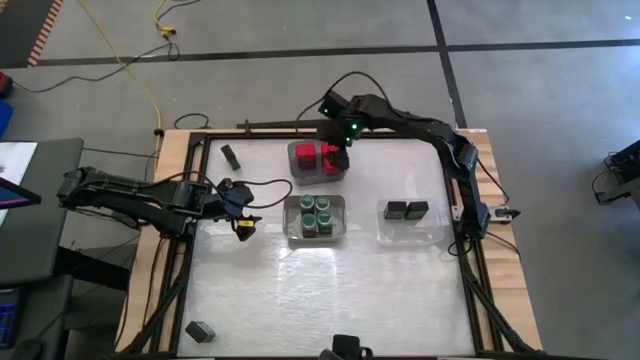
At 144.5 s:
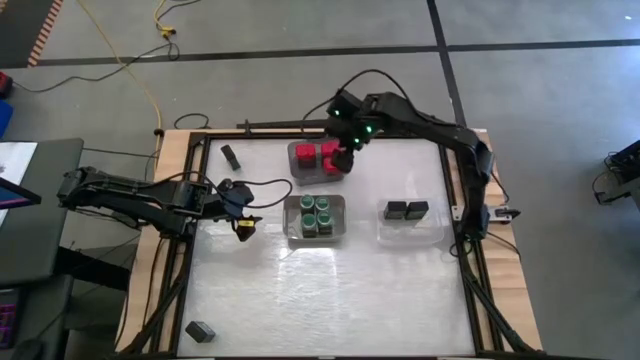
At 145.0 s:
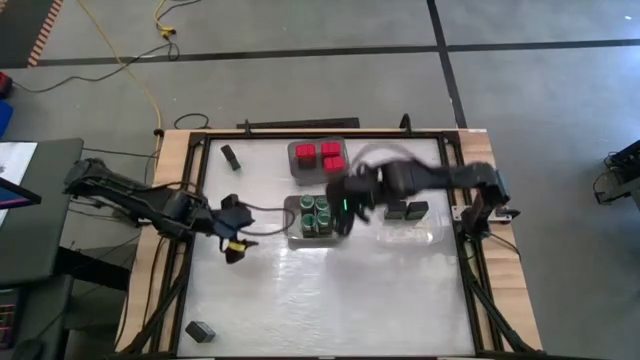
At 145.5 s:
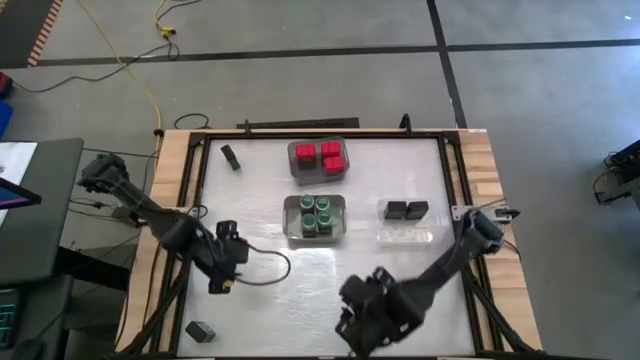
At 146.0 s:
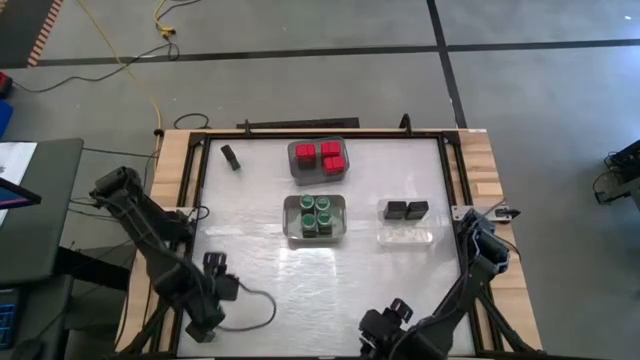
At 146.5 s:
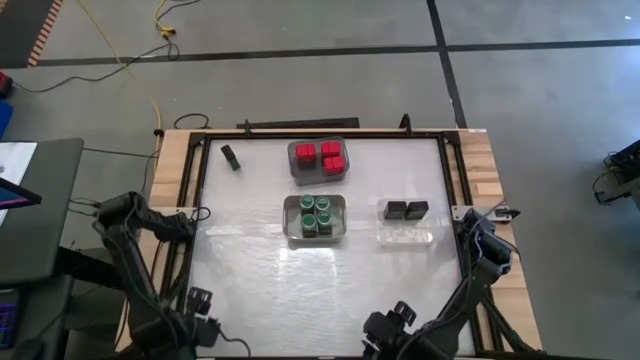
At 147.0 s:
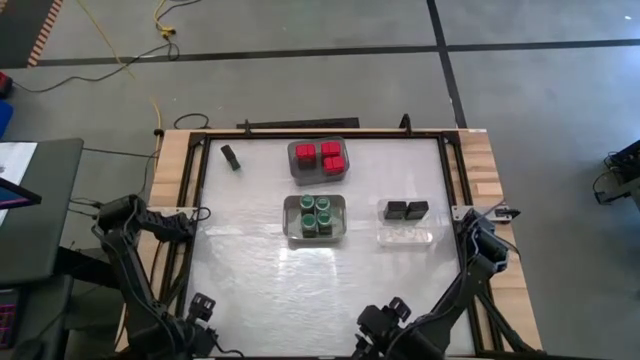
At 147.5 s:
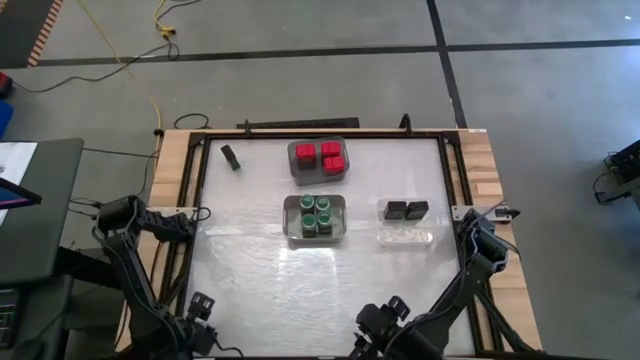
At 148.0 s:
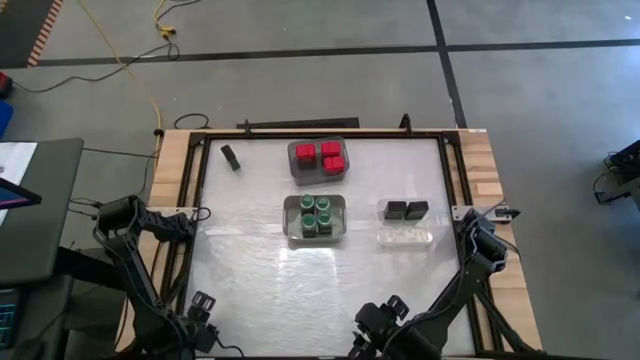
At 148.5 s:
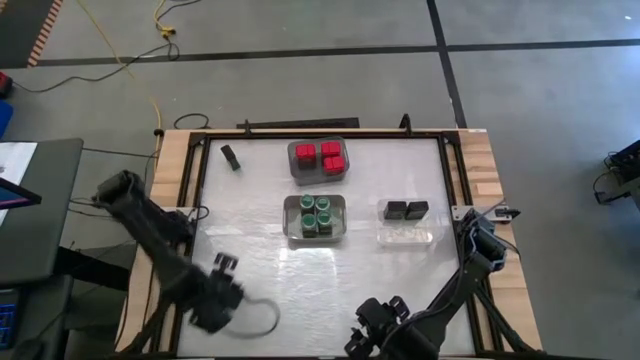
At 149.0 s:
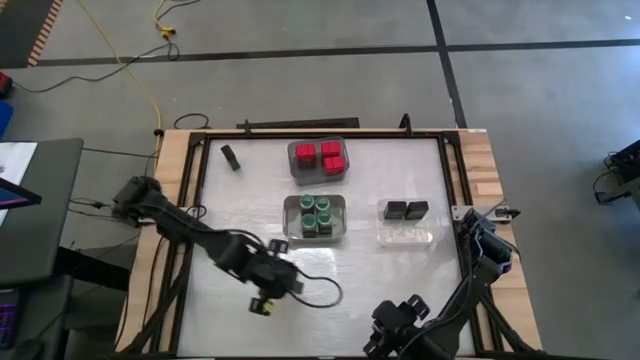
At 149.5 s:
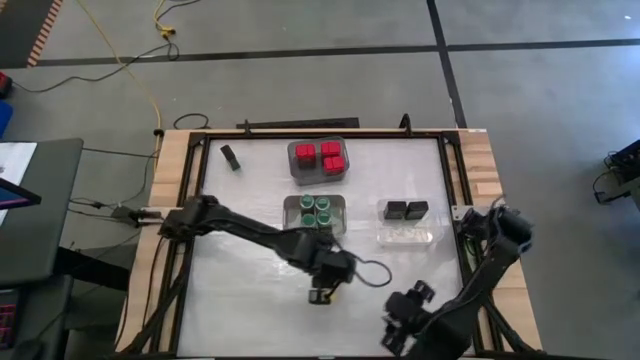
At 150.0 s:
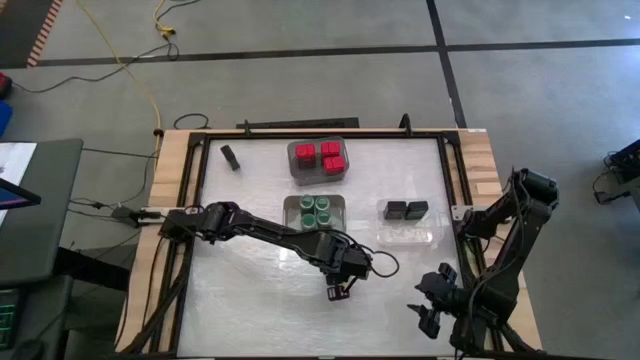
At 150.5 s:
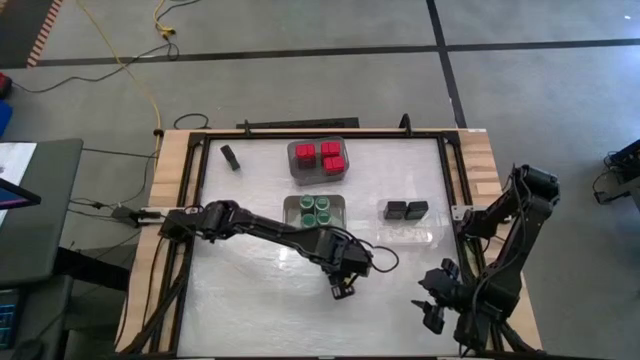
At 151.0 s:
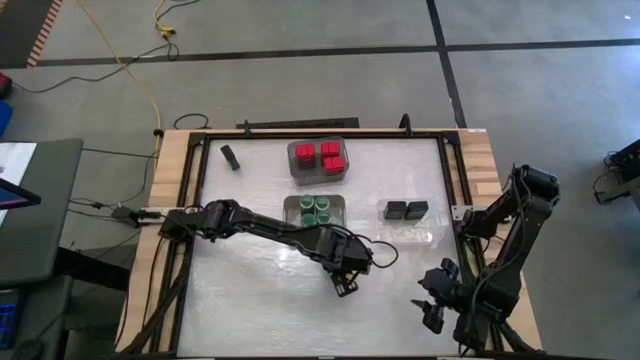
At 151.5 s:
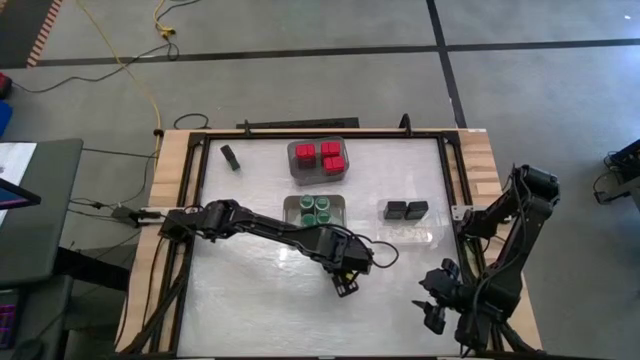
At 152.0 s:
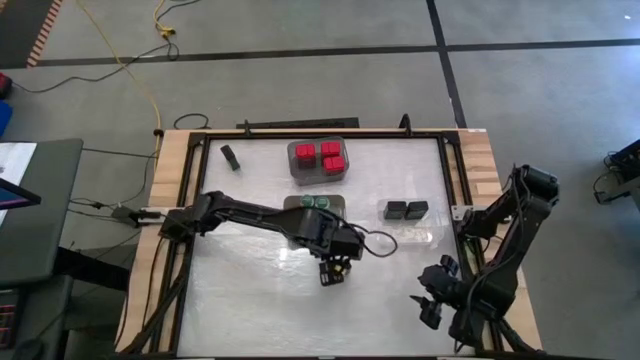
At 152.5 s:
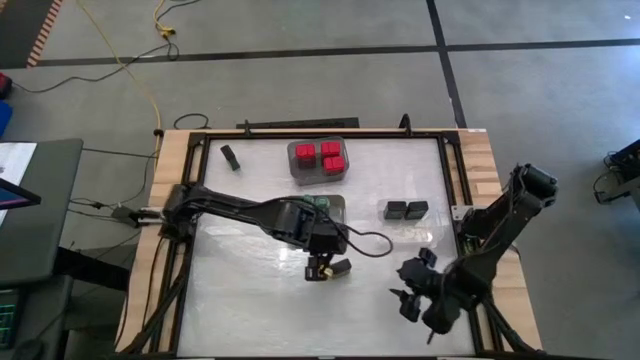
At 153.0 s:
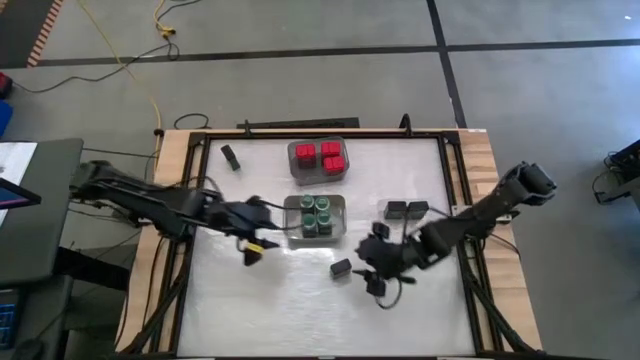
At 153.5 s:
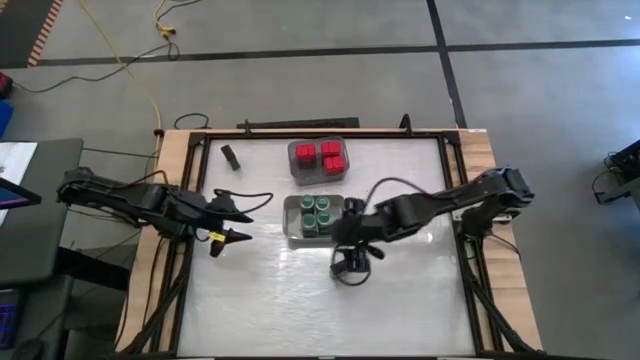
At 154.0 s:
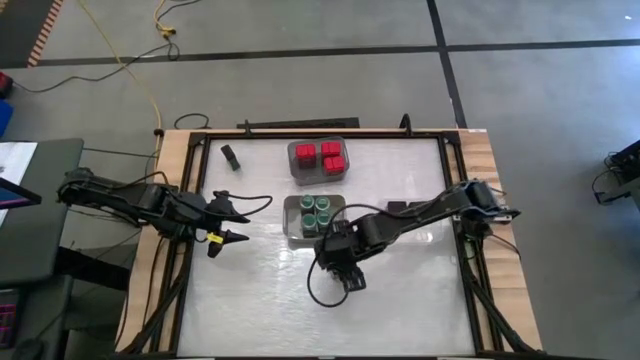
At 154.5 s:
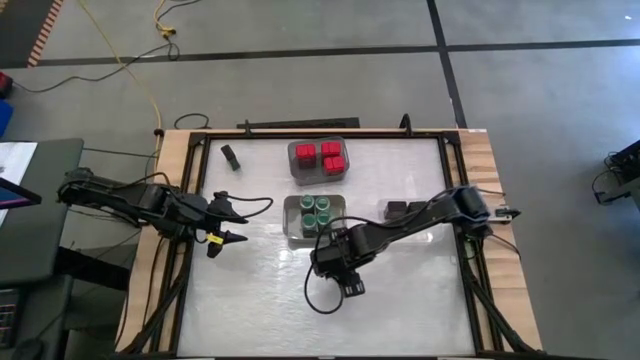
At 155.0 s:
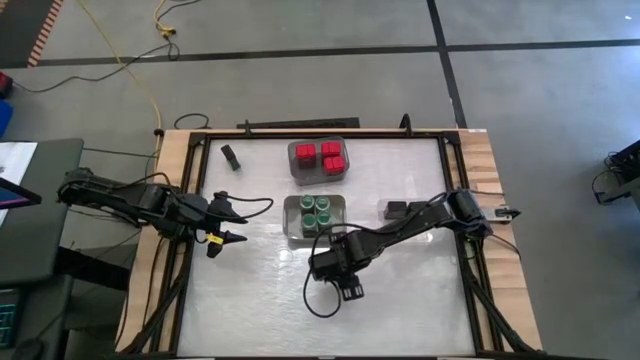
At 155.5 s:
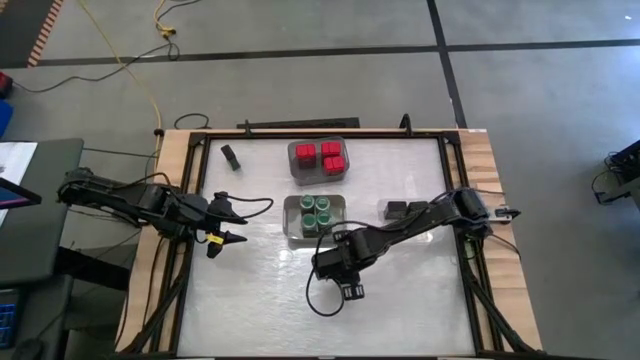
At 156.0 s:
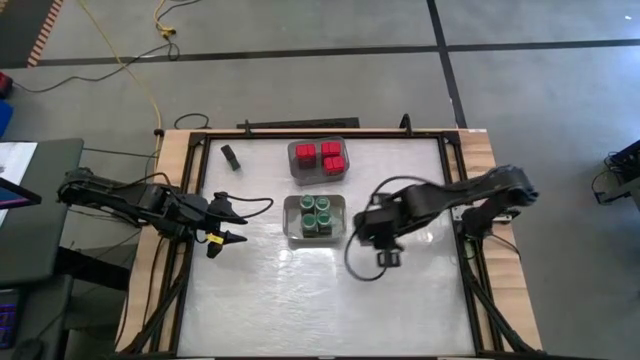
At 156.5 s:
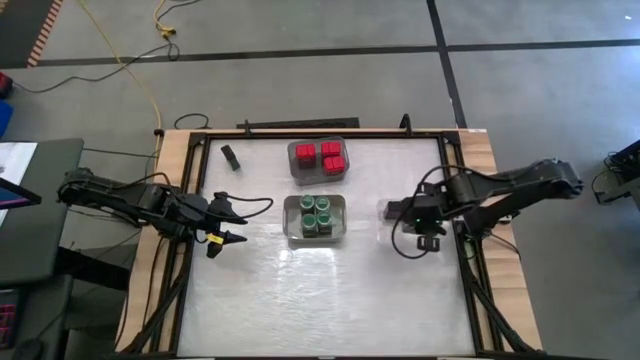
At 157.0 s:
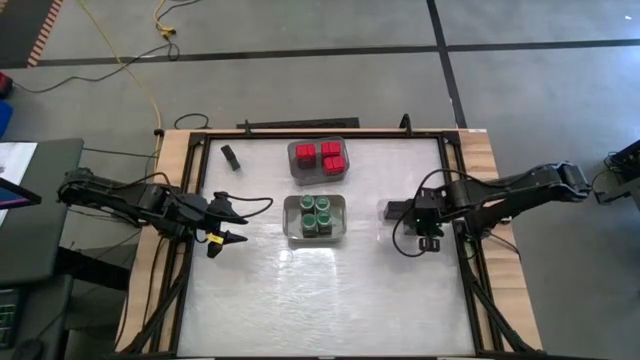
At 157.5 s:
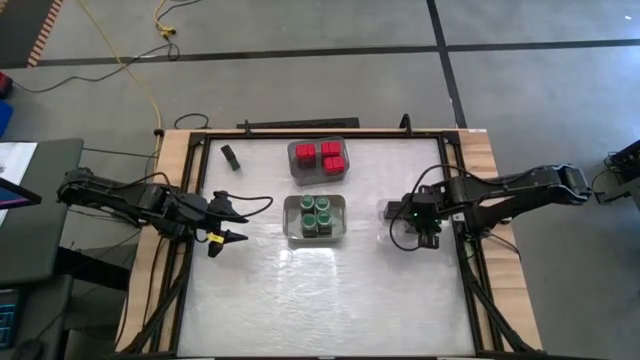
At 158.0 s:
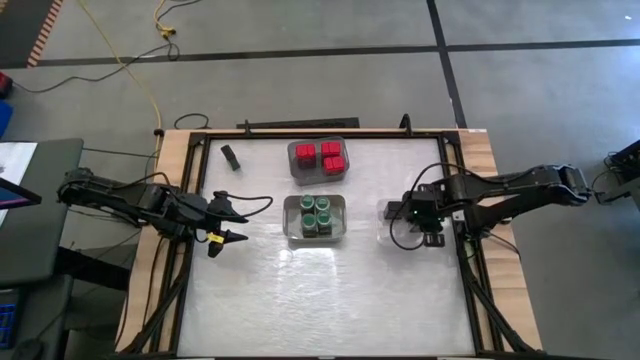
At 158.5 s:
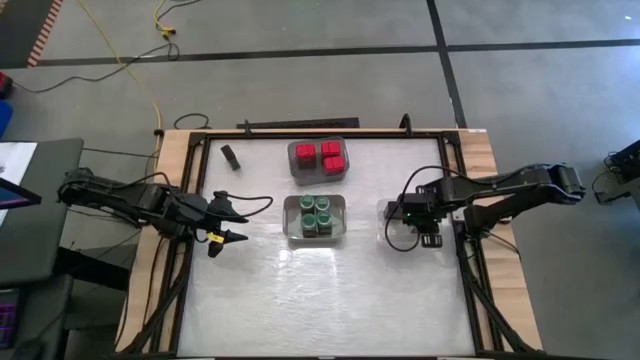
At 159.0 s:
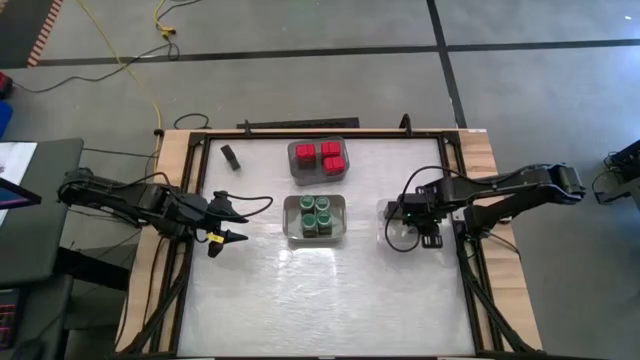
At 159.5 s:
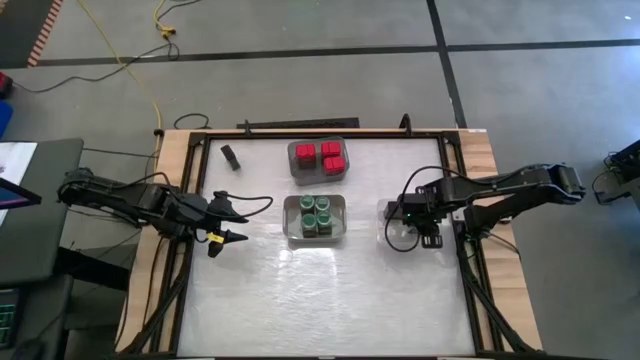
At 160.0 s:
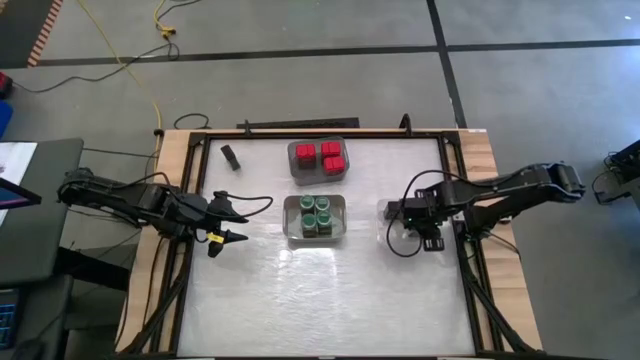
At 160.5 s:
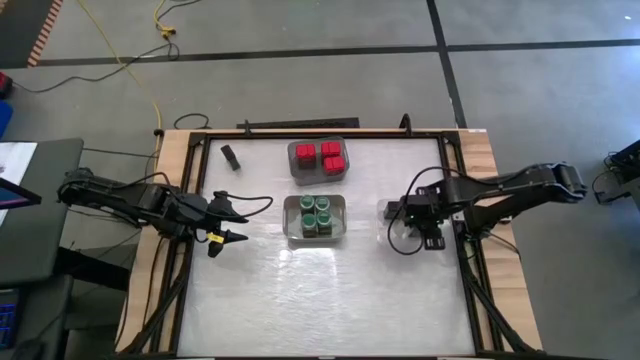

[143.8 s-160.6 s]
Task: Sort spices by type
Put the black spice can into the transparent bin

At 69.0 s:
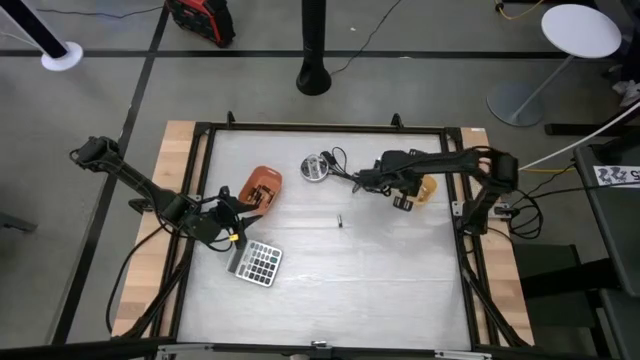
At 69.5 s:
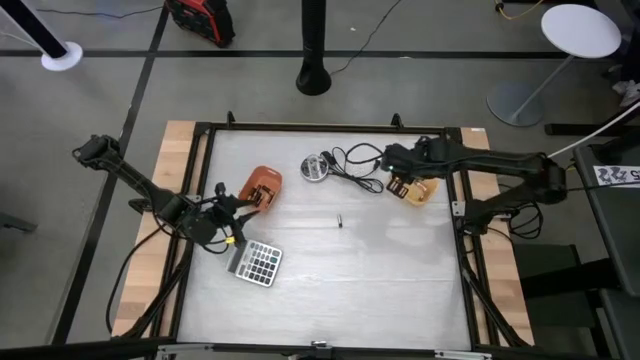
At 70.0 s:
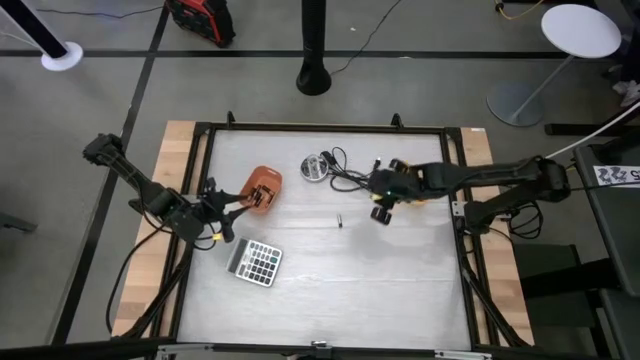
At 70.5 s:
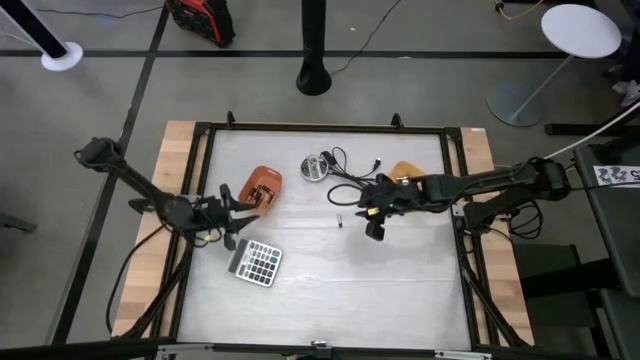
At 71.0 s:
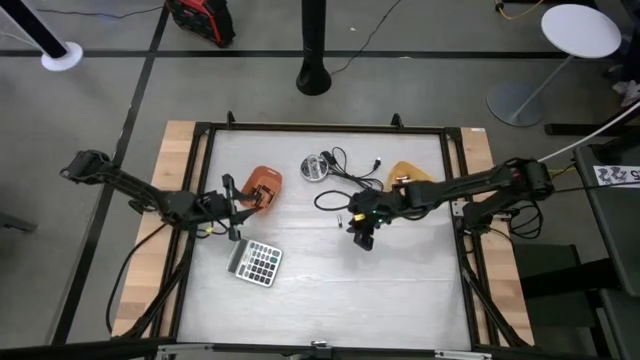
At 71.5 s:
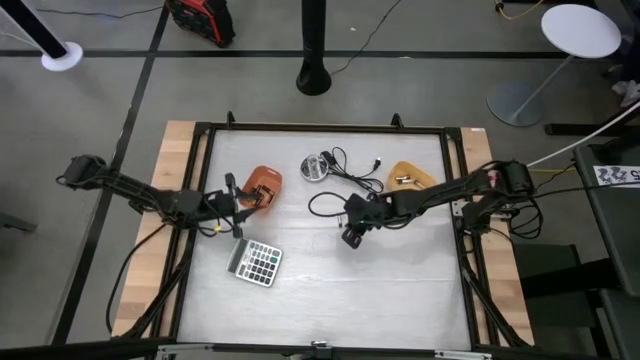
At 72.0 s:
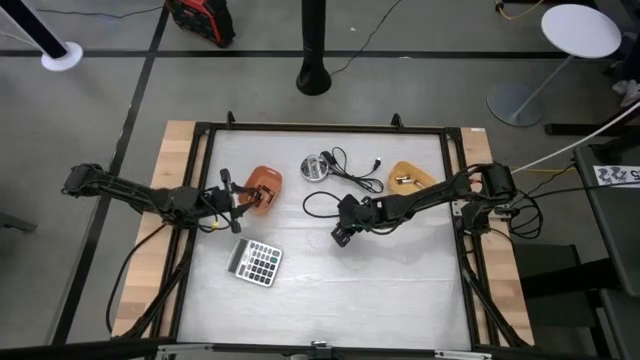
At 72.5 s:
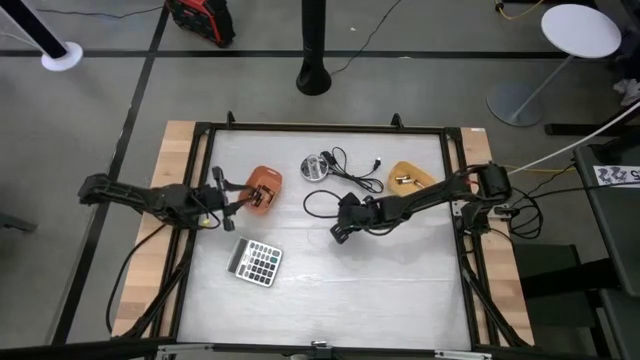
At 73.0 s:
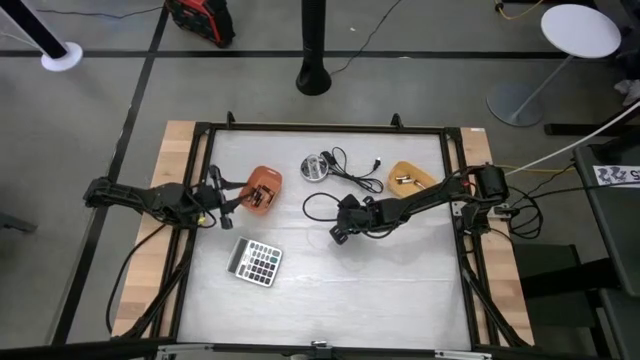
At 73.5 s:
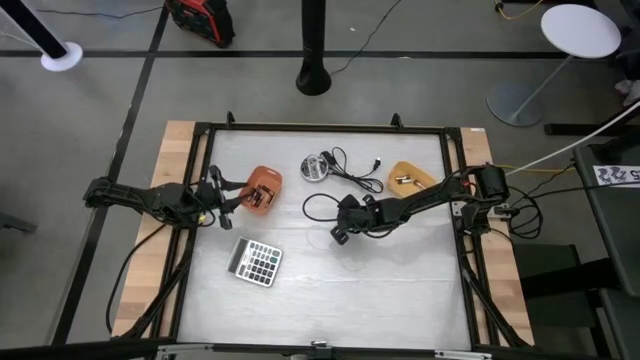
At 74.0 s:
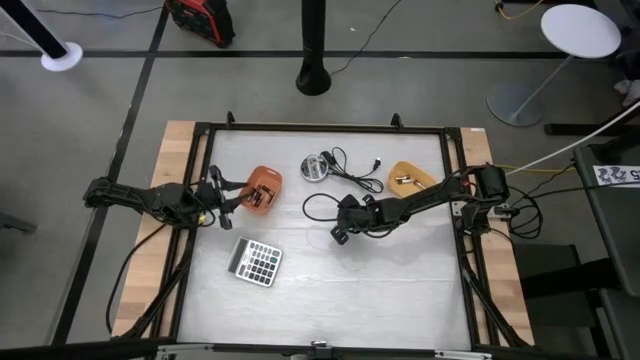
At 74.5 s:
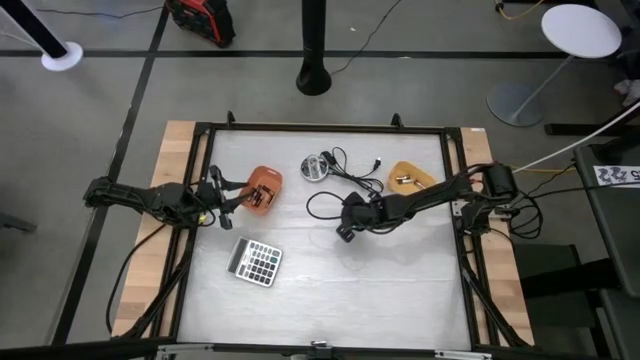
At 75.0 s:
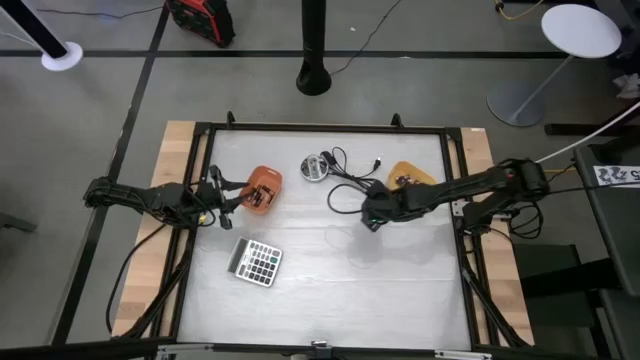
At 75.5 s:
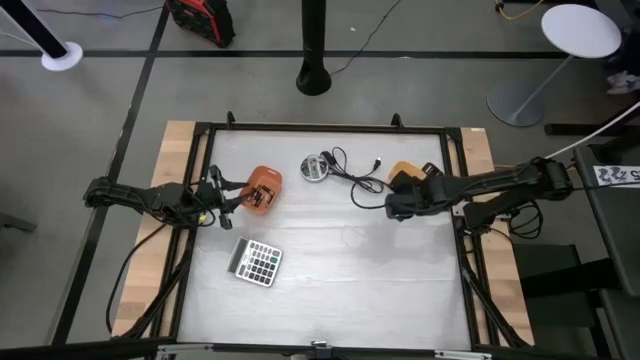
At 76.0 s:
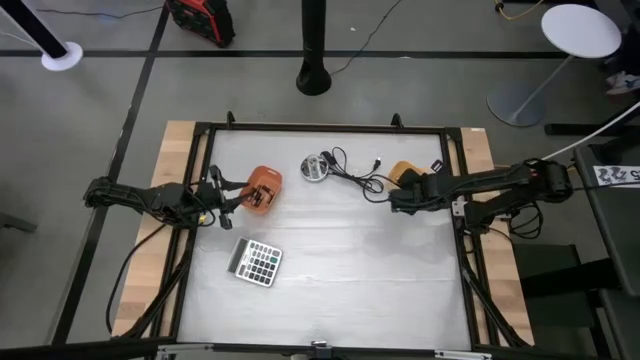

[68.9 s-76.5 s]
Task: Sort batteries
Put the silver battery into the yellow bin
